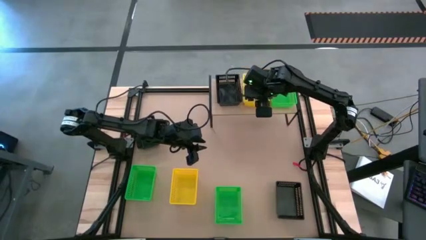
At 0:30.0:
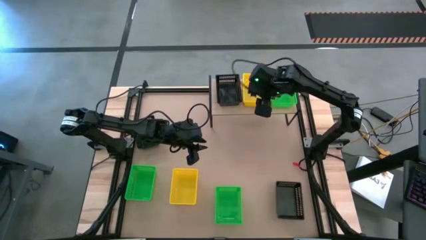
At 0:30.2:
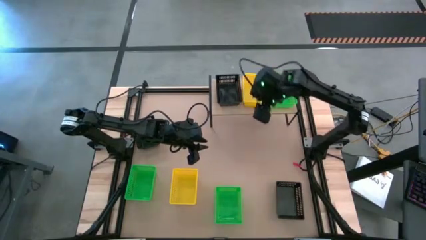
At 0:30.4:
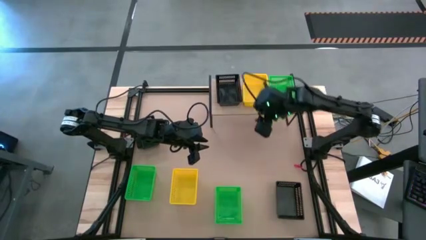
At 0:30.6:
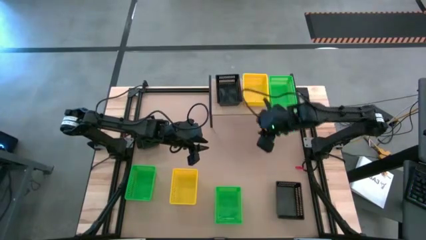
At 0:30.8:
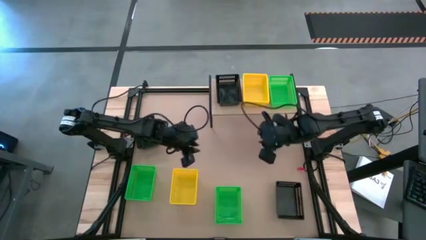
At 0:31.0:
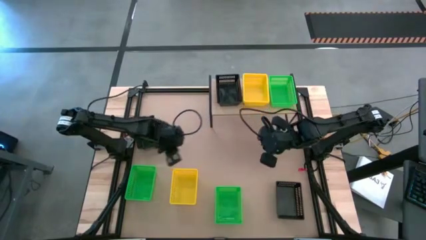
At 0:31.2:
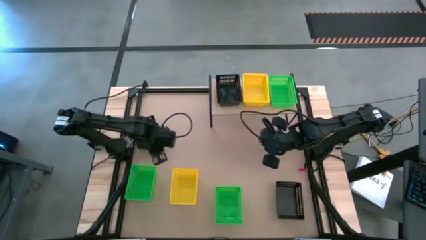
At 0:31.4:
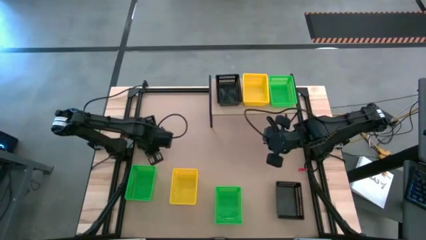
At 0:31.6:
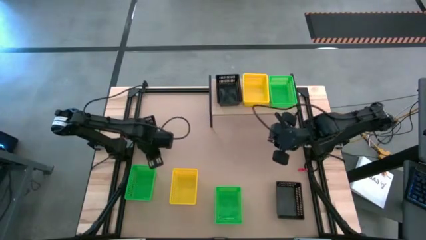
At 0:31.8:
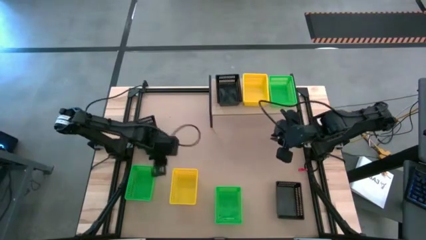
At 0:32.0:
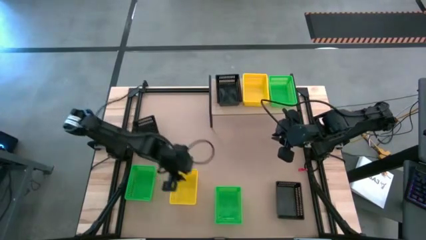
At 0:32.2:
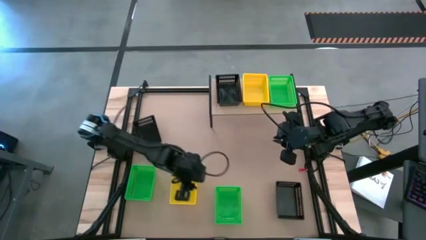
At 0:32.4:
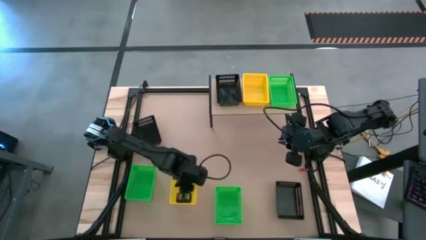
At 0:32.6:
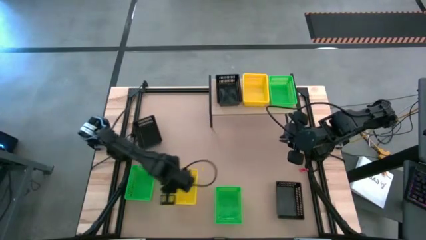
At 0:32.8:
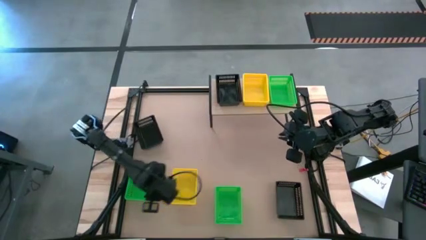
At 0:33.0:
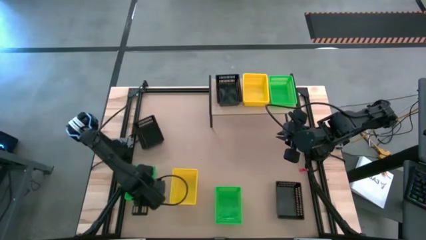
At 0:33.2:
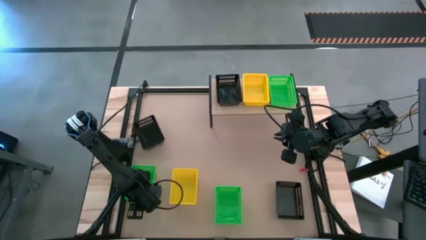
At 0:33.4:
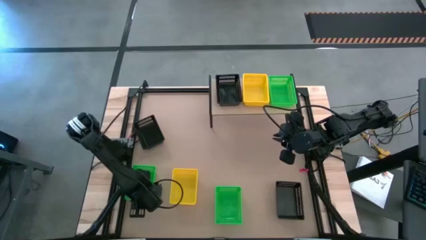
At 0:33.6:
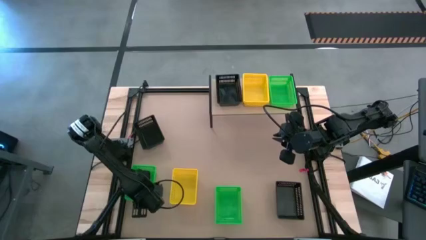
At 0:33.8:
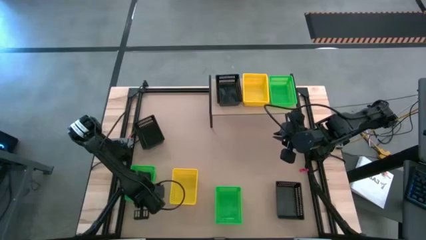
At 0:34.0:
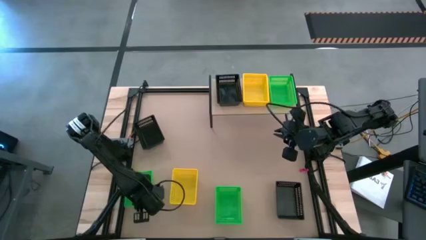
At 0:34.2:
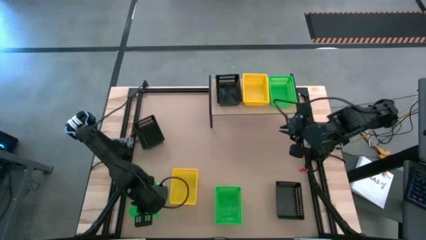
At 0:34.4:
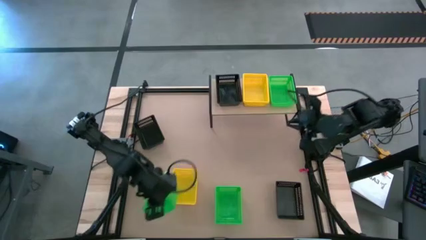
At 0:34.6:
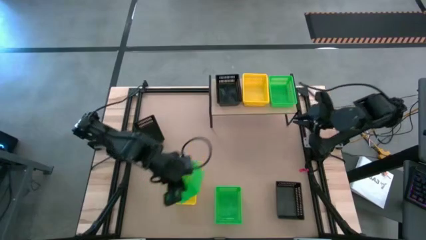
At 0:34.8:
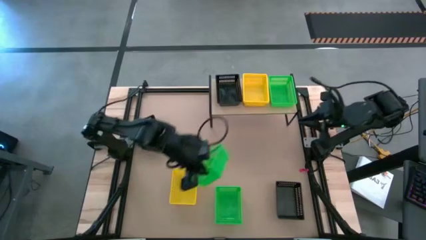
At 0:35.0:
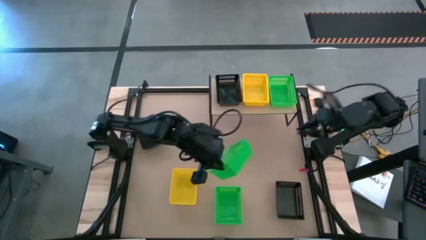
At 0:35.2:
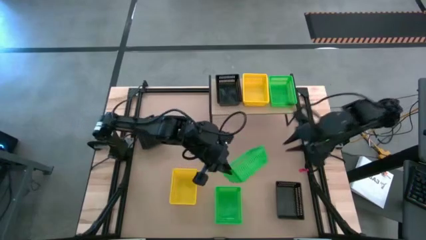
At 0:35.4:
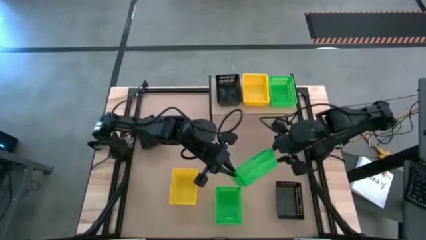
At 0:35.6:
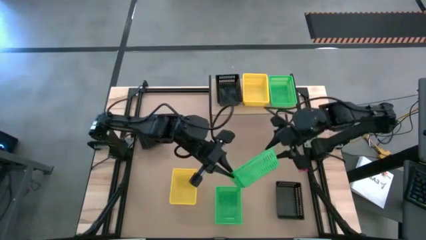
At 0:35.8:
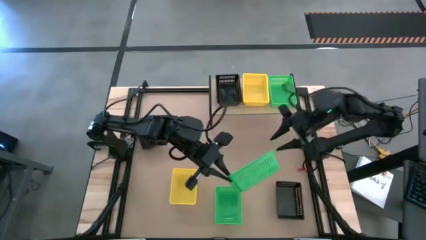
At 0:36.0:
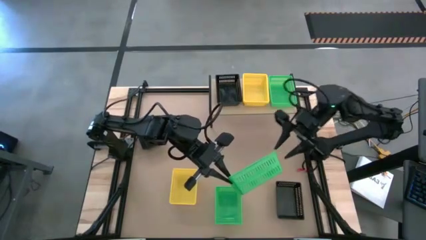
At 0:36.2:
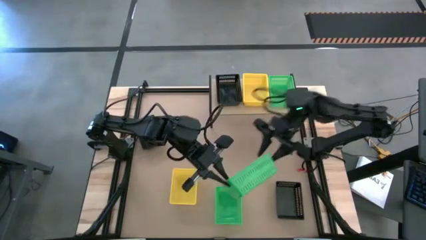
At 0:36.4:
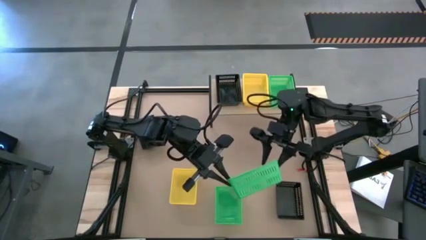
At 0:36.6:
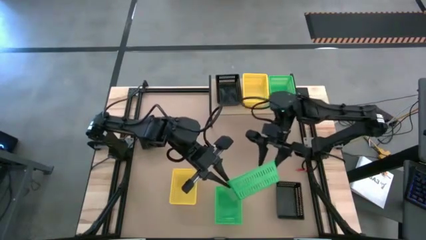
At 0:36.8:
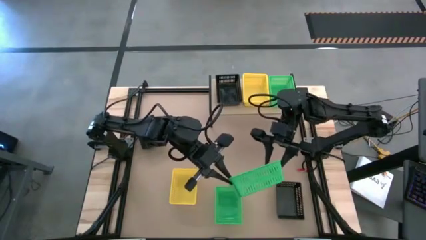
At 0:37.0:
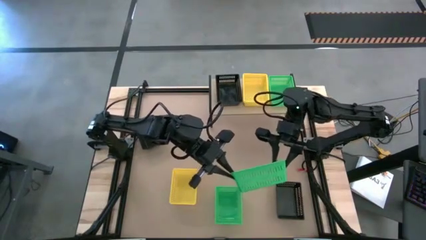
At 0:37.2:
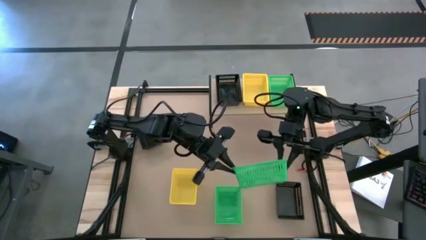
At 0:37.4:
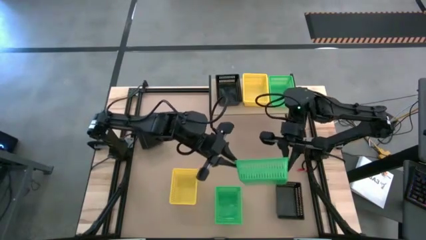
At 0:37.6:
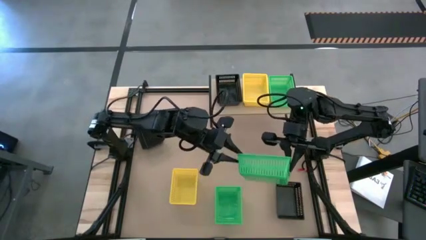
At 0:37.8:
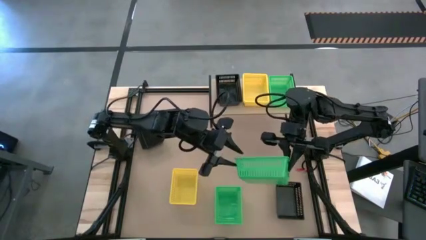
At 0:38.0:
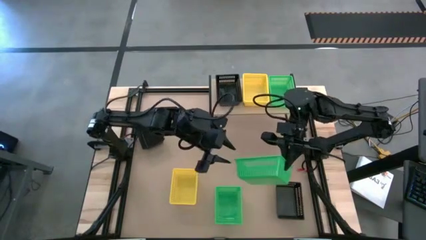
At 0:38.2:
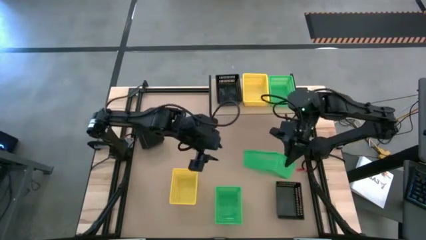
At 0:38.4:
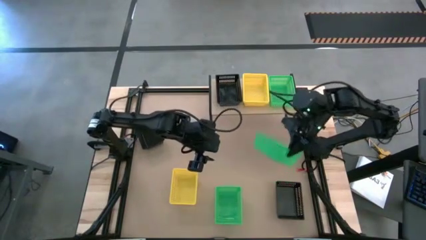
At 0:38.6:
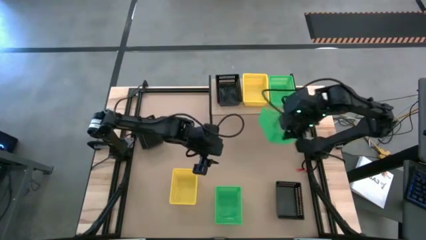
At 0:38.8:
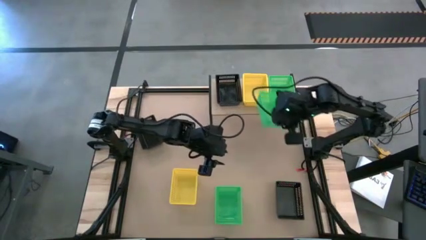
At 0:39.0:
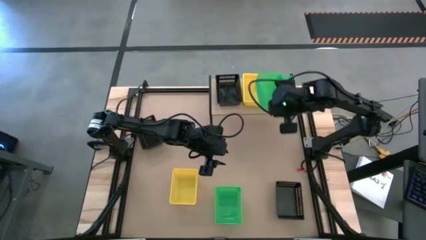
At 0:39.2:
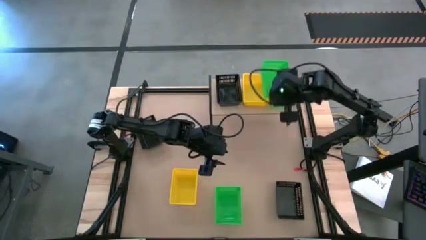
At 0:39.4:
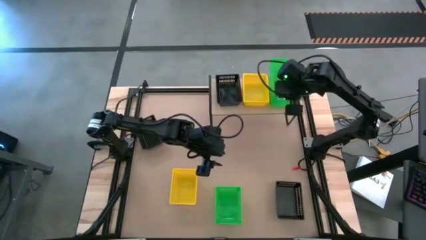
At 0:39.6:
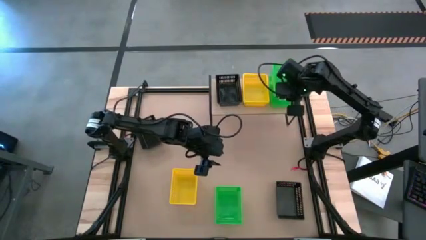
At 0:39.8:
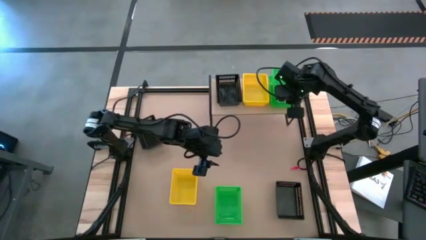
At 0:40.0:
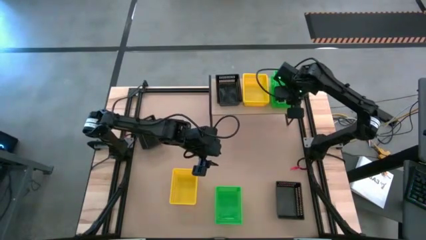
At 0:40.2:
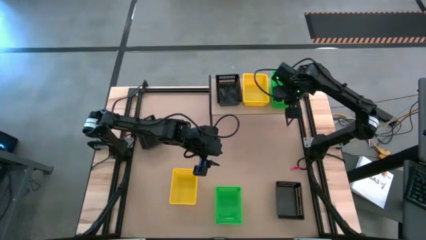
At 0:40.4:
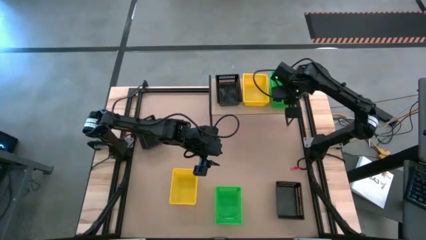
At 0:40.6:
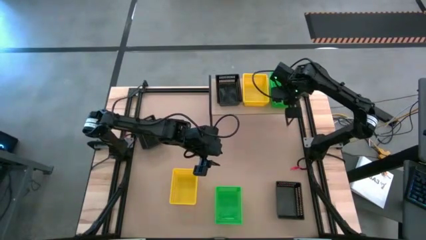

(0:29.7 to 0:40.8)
Task: Stack baskets on shelf by color
Stack the left green bin on top of the green bin on the shelf
